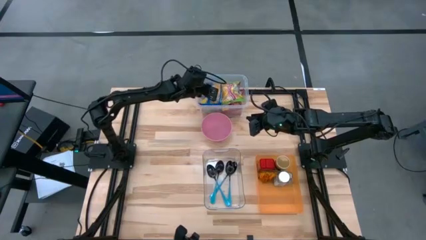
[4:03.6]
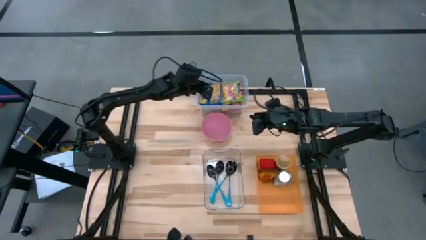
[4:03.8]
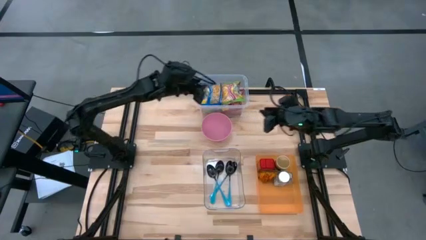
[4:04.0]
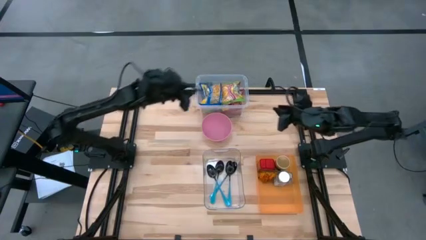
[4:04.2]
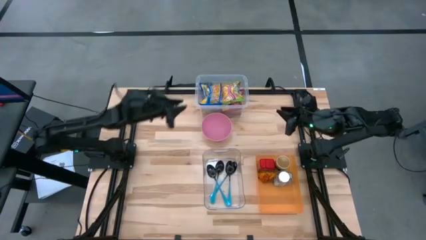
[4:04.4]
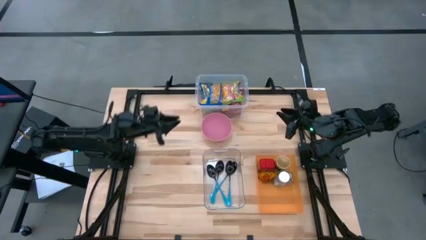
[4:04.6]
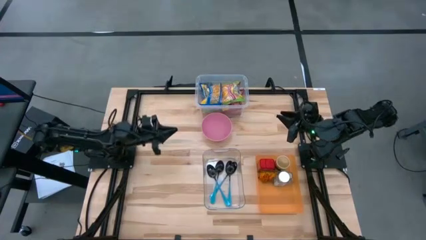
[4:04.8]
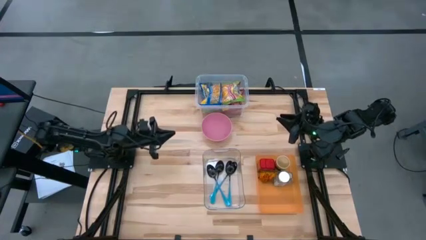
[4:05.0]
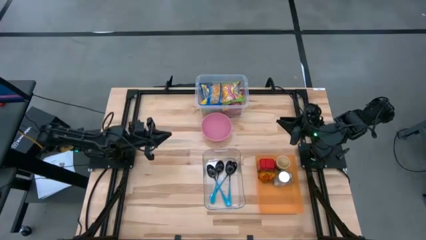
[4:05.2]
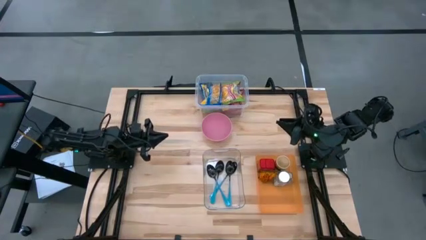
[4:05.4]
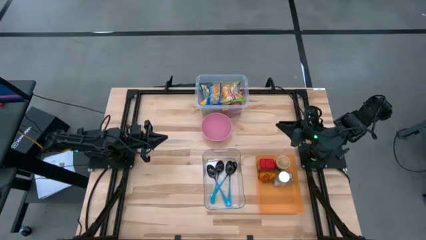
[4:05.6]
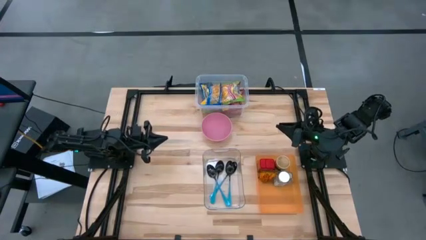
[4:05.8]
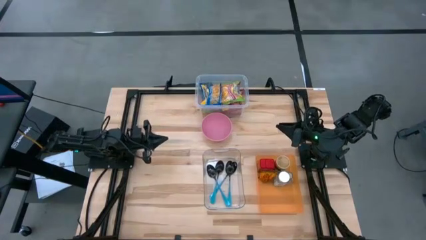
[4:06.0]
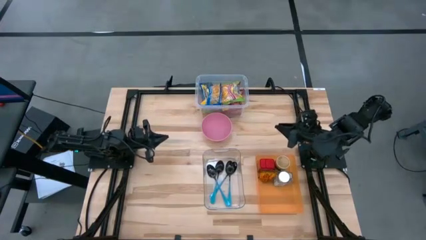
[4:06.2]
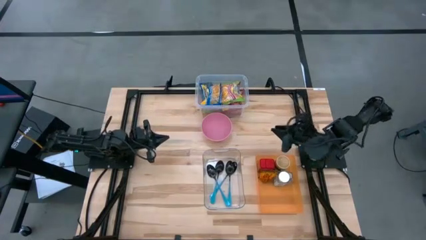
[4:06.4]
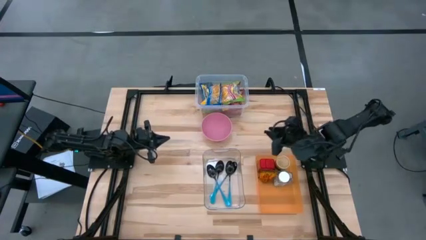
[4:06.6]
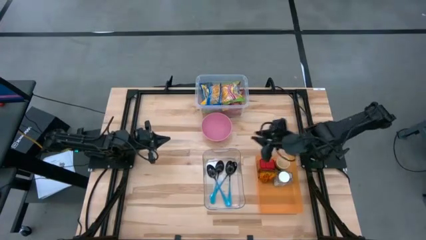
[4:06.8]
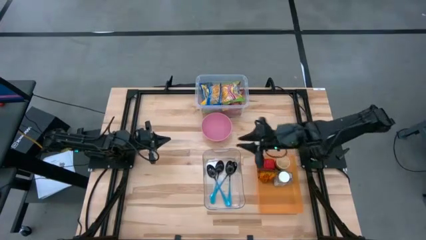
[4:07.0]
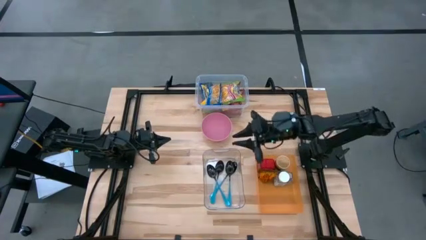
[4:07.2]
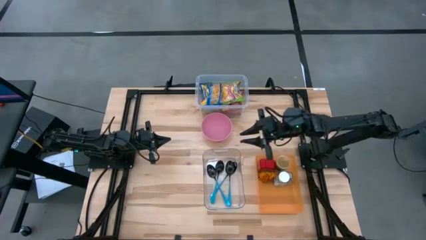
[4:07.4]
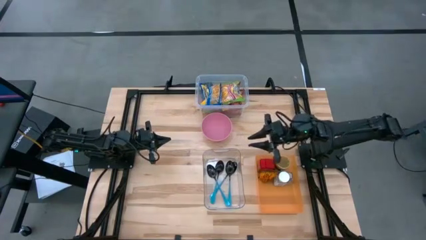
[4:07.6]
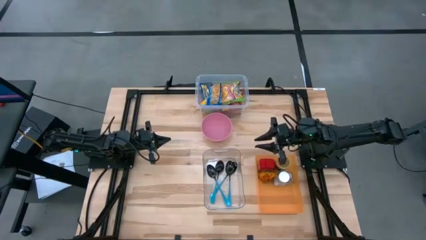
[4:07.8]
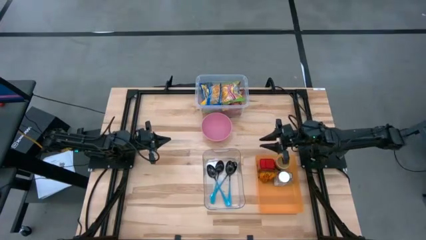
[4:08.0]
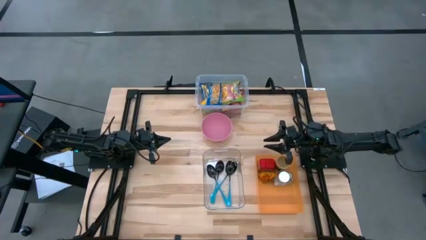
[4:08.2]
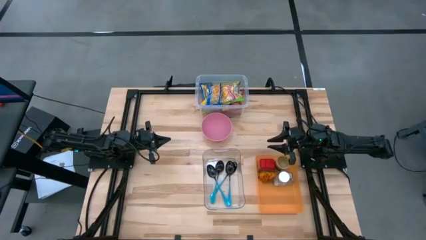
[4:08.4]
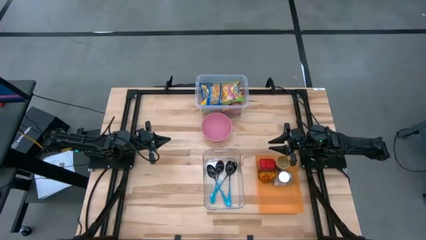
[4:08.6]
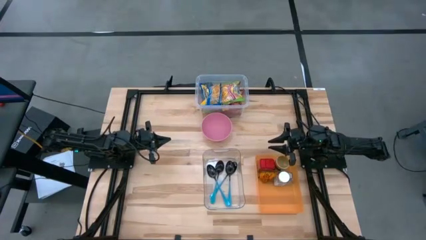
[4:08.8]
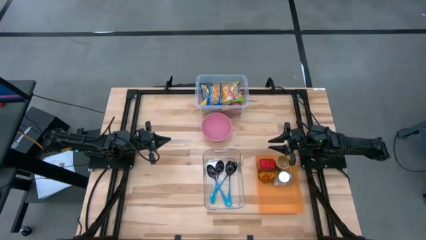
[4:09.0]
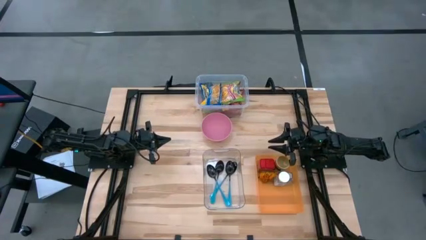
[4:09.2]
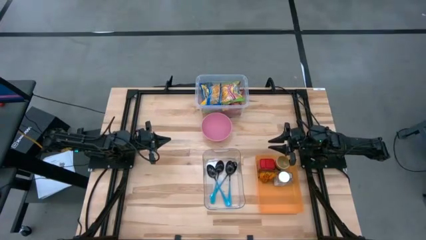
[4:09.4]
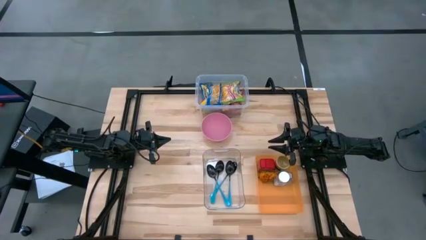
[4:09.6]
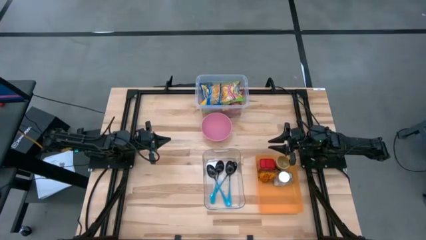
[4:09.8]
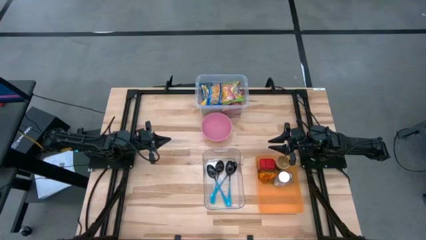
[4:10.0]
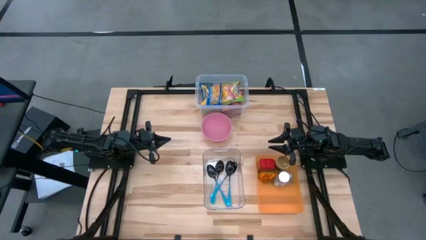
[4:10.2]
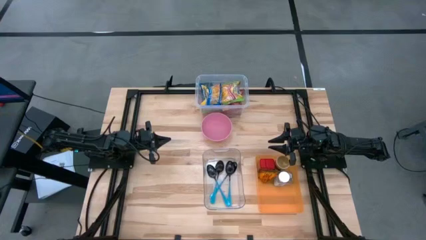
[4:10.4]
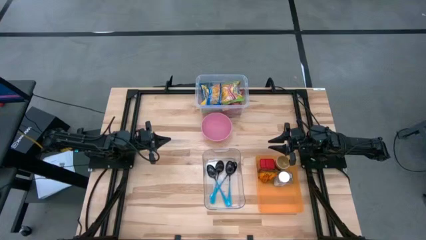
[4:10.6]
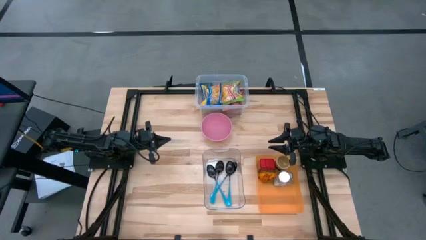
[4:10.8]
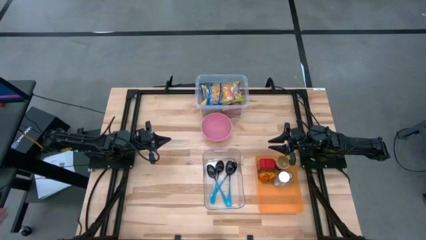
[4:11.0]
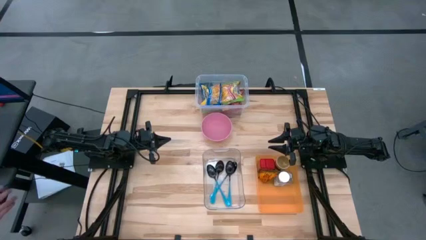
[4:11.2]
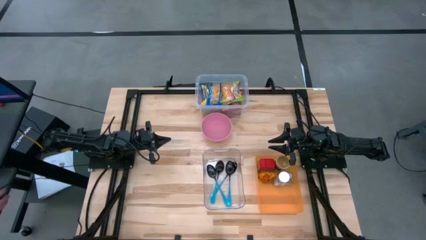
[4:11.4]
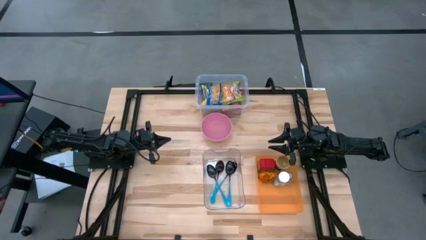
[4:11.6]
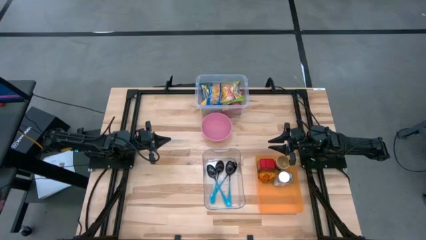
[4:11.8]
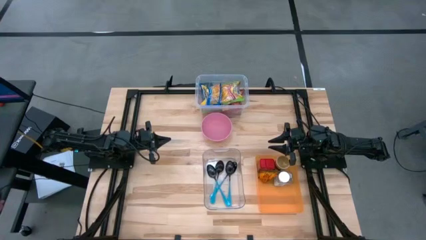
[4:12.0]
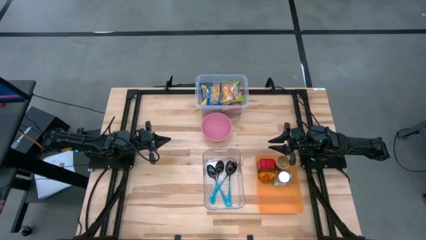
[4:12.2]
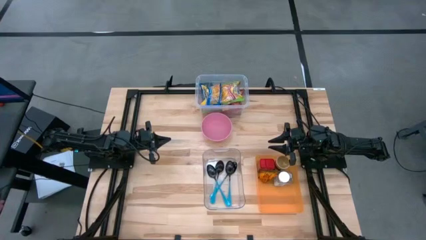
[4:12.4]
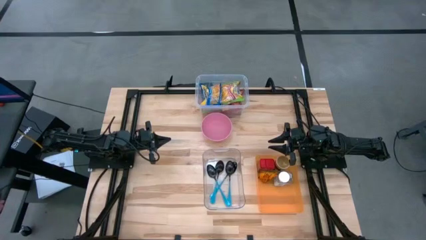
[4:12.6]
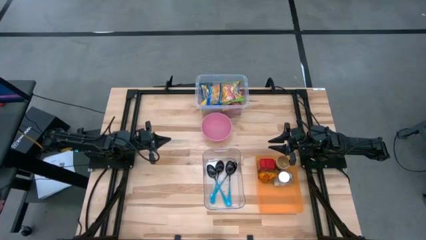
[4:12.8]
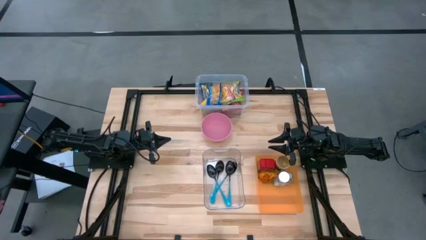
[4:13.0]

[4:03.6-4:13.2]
Task: Pick & Place Food Item
Return to Home Position

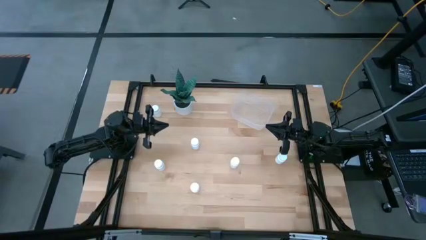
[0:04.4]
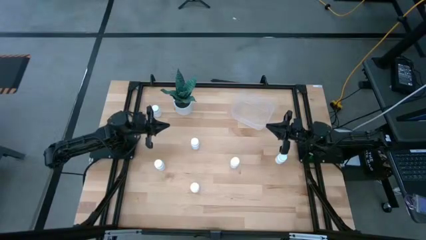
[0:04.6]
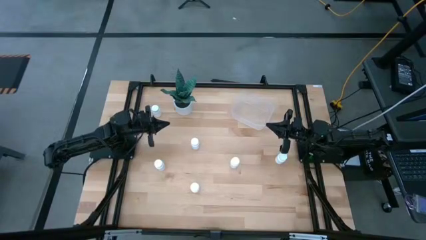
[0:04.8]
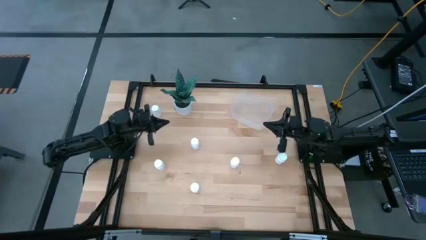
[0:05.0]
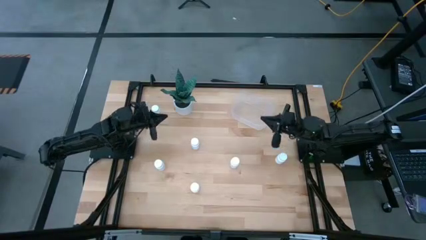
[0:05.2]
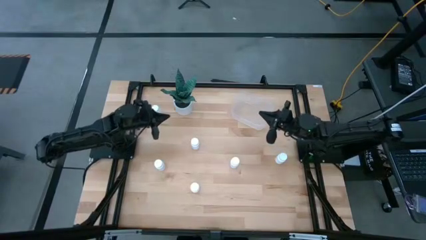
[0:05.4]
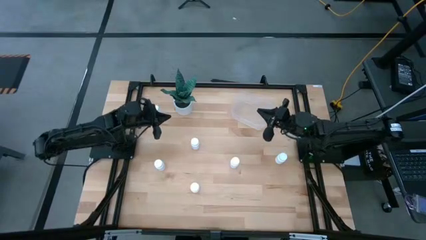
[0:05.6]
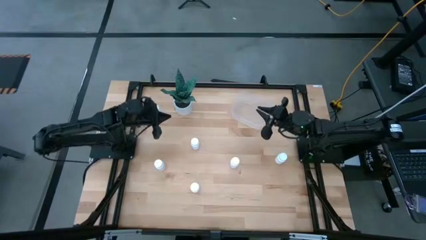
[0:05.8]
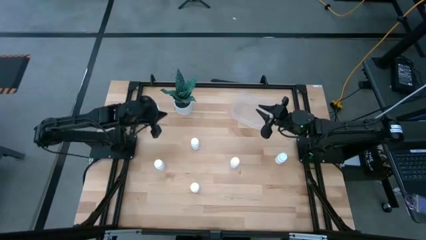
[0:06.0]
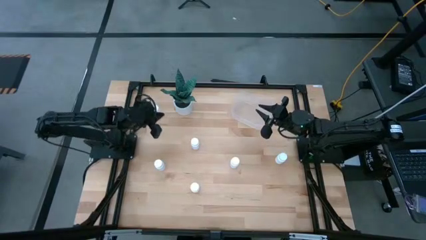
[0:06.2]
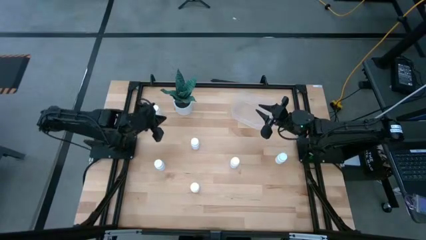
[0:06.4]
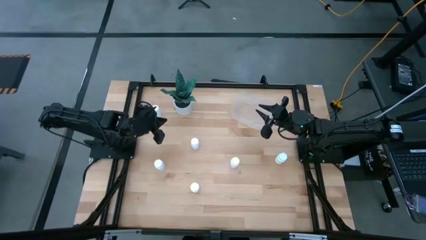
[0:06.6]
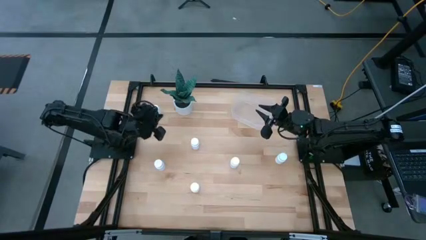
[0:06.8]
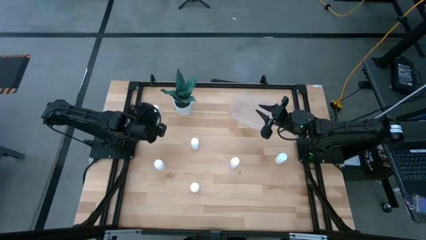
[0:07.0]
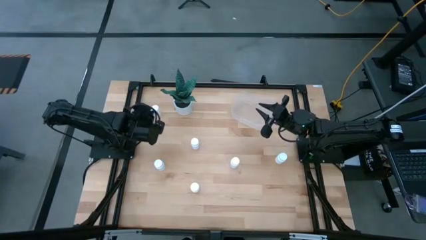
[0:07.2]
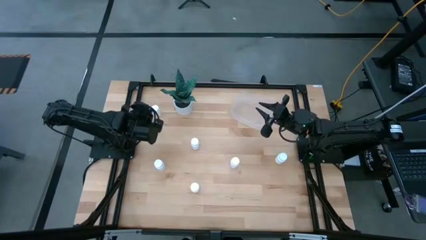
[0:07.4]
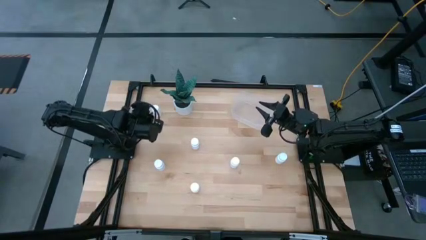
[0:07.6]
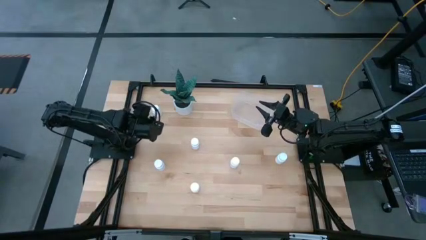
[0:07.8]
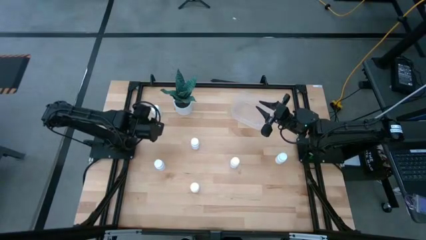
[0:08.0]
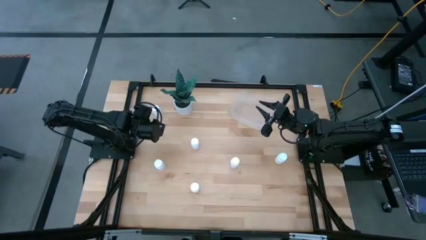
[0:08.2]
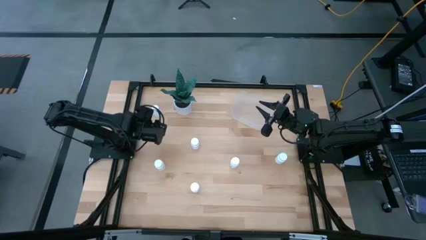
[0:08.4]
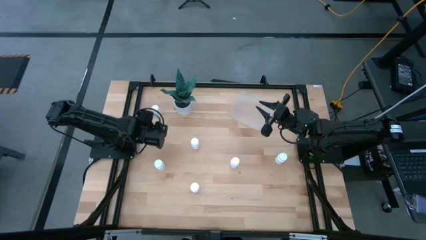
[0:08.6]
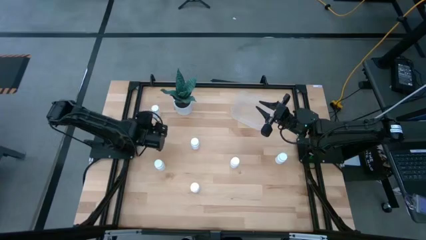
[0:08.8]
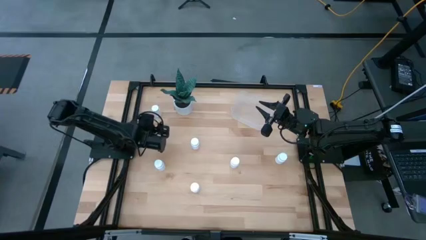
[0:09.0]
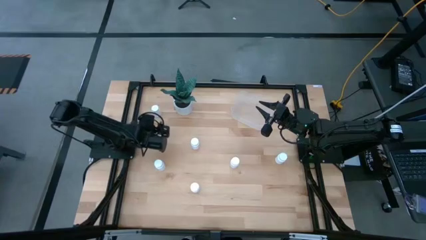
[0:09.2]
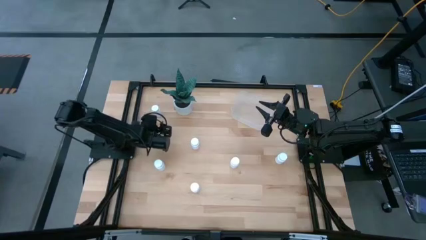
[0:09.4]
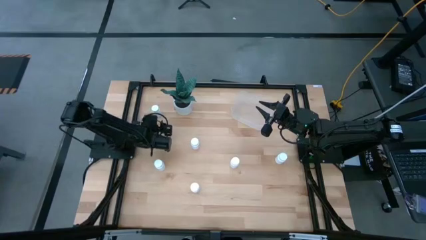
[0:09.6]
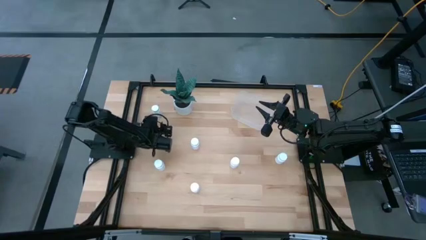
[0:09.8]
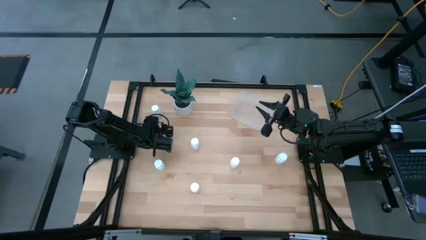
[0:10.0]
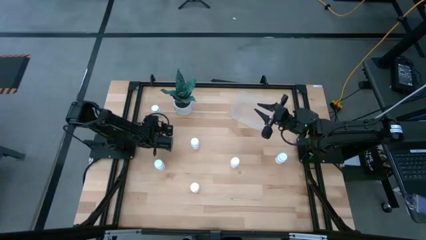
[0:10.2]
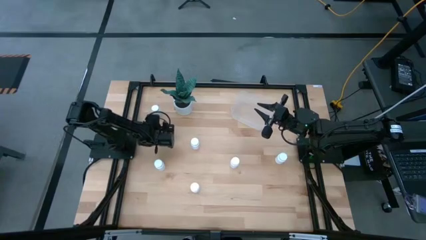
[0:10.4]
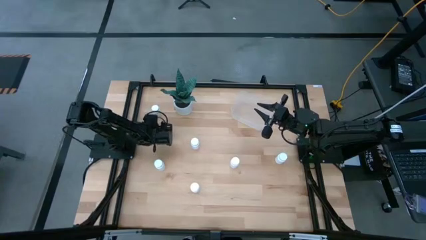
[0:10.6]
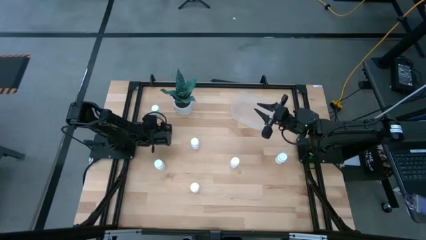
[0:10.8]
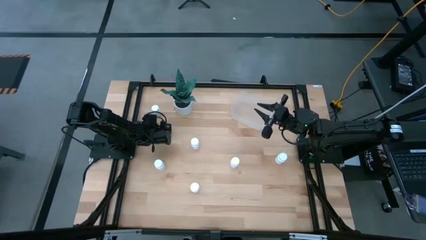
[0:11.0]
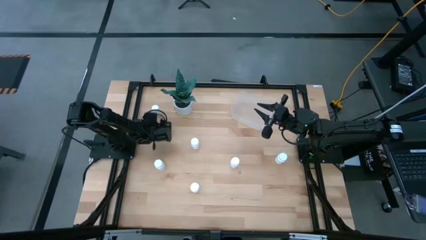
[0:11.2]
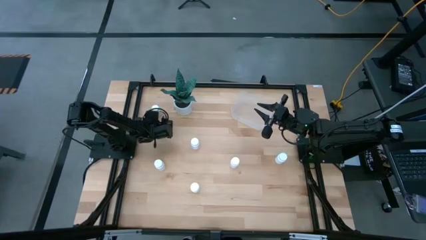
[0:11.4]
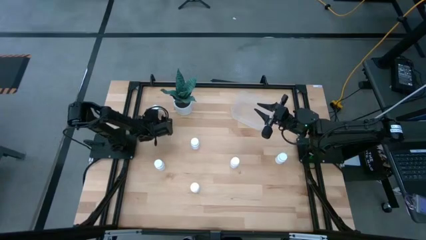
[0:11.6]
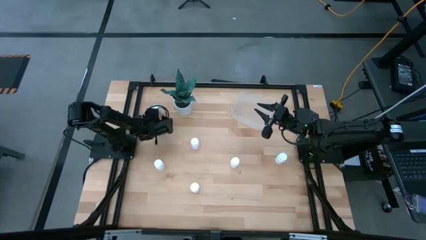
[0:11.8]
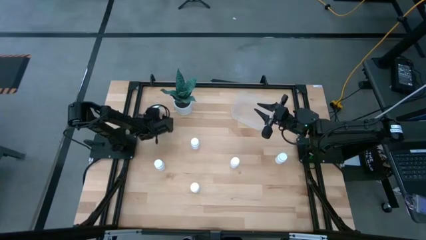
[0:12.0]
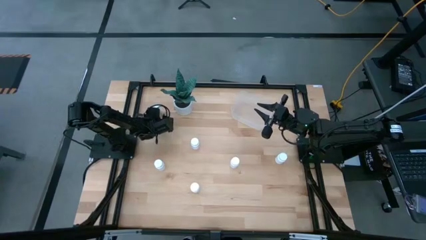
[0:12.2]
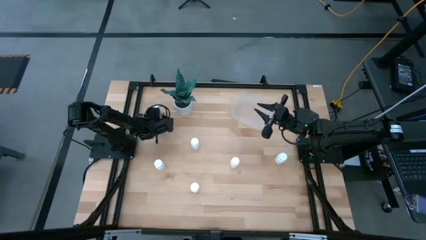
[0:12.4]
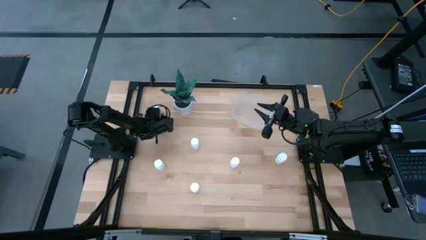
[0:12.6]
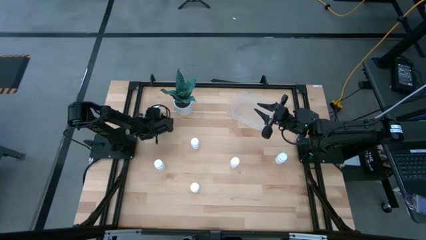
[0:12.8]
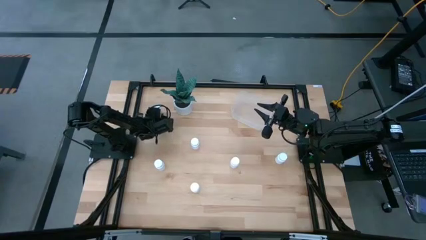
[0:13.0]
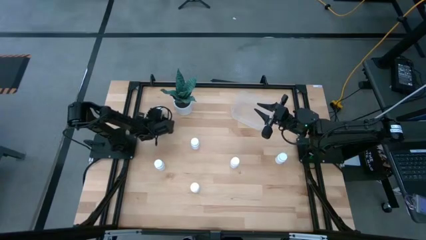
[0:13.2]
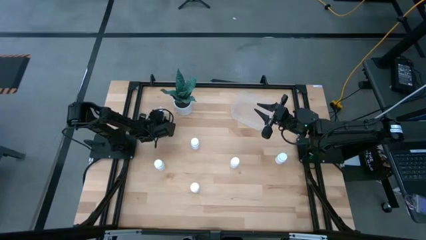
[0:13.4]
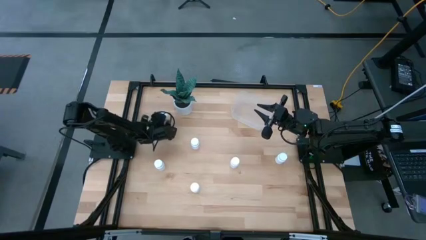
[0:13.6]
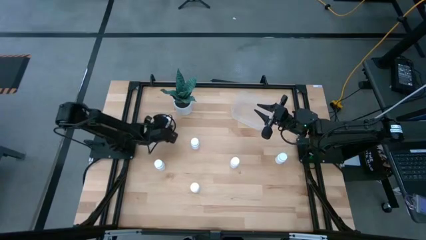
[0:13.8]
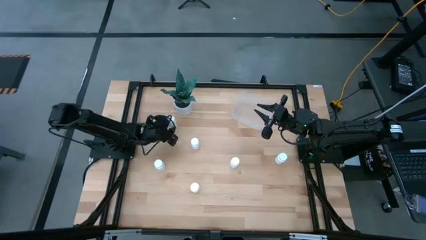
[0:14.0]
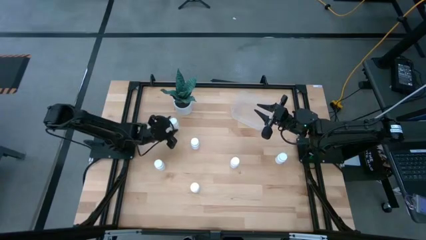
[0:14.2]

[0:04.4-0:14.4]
Task: Pick and place pill bottles into a basket
Put the white pill bottle into the transparent bin
